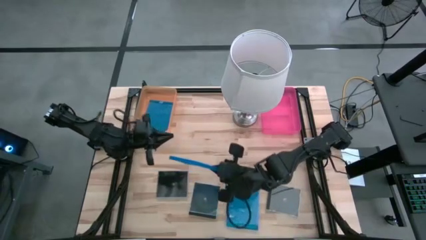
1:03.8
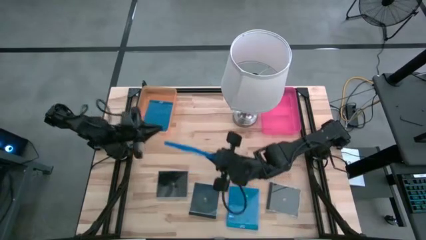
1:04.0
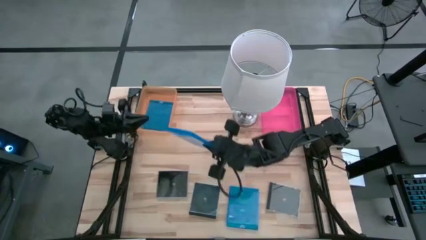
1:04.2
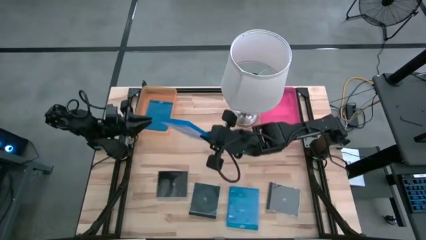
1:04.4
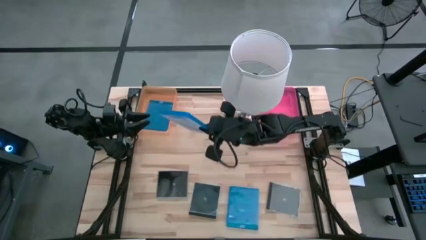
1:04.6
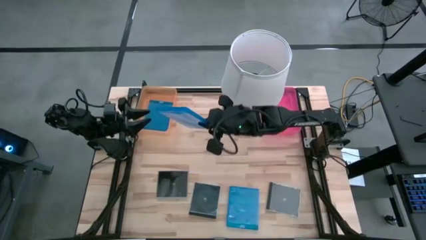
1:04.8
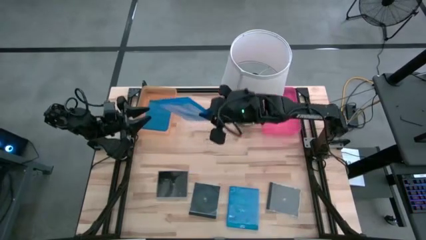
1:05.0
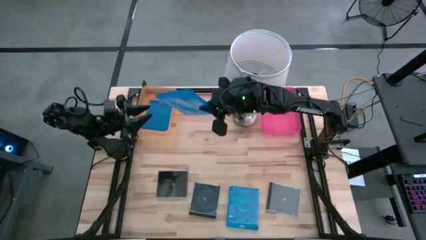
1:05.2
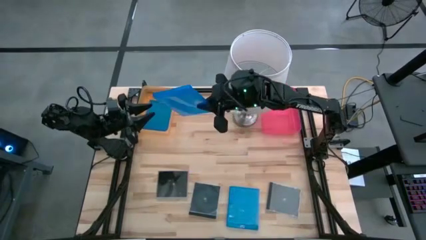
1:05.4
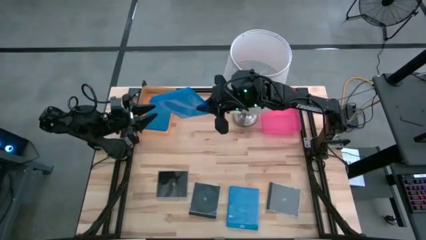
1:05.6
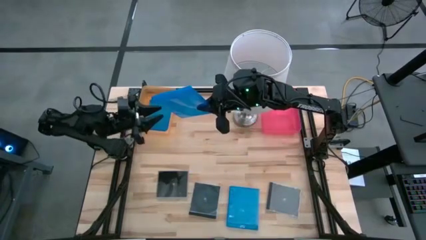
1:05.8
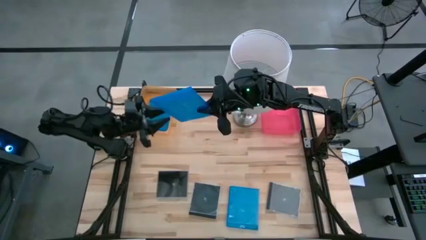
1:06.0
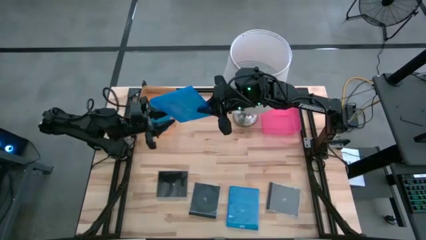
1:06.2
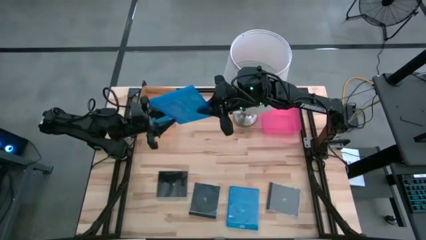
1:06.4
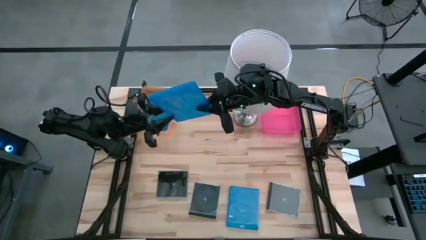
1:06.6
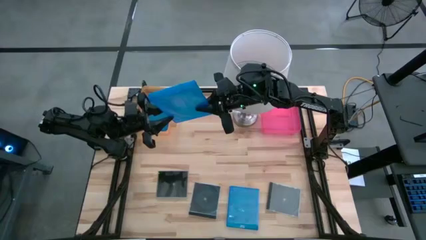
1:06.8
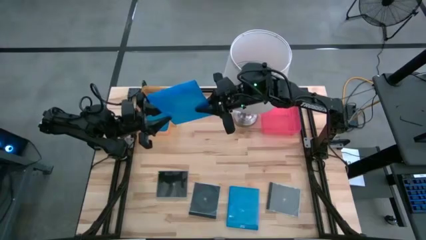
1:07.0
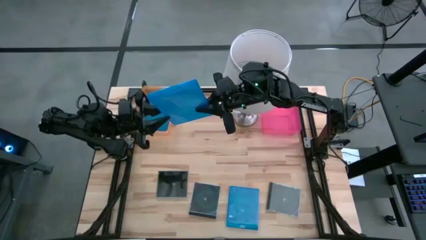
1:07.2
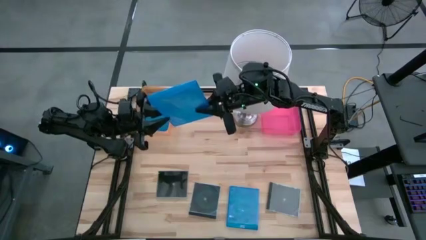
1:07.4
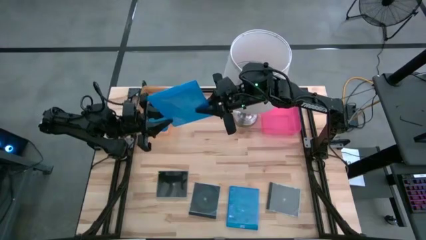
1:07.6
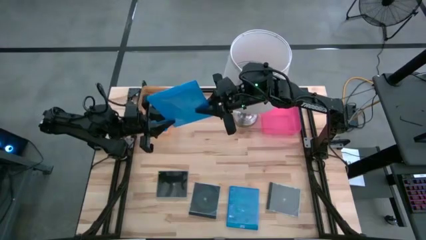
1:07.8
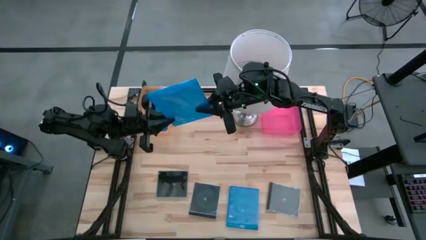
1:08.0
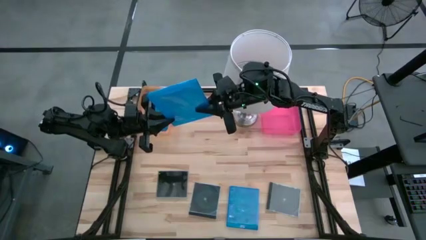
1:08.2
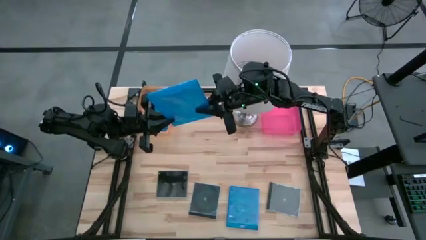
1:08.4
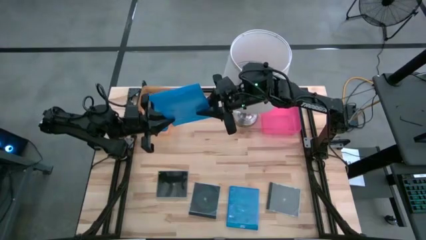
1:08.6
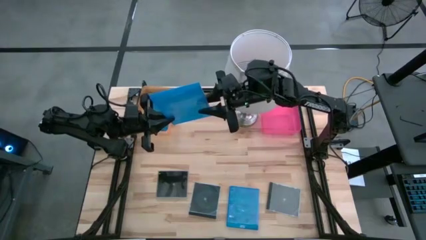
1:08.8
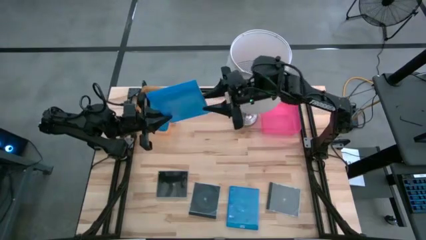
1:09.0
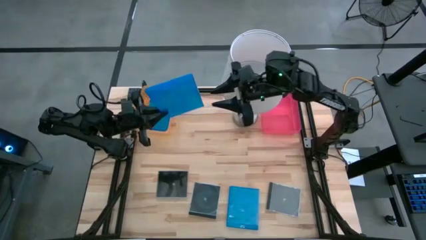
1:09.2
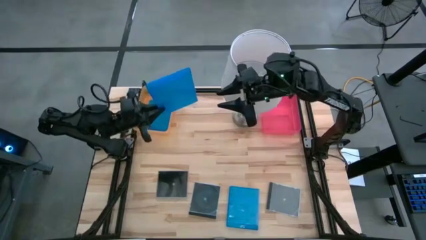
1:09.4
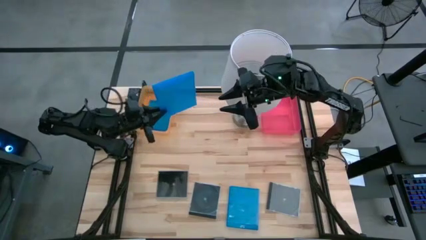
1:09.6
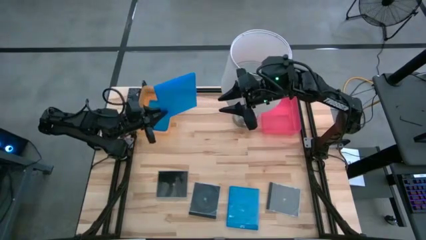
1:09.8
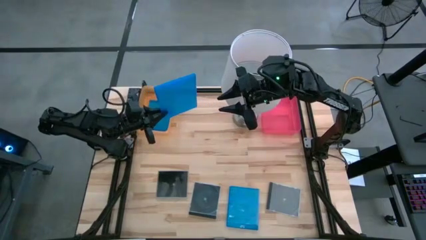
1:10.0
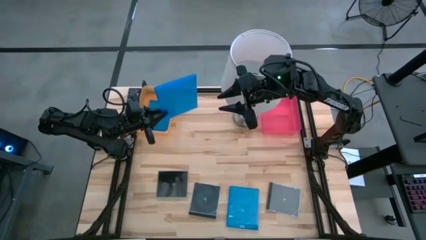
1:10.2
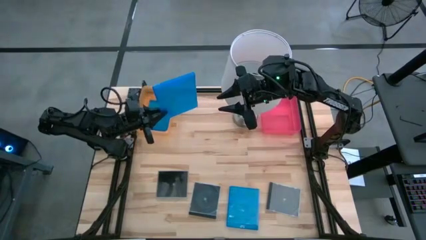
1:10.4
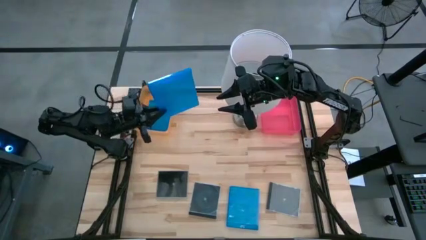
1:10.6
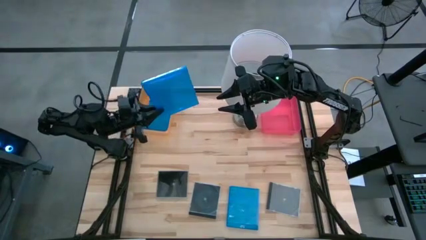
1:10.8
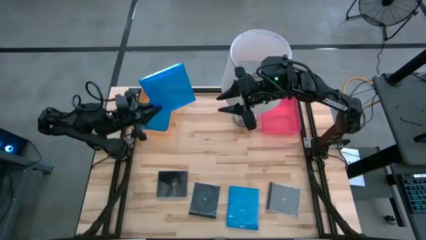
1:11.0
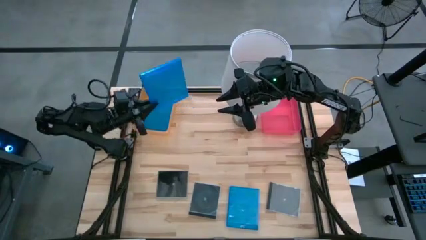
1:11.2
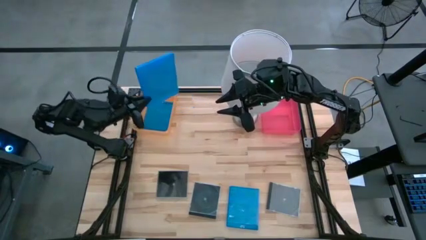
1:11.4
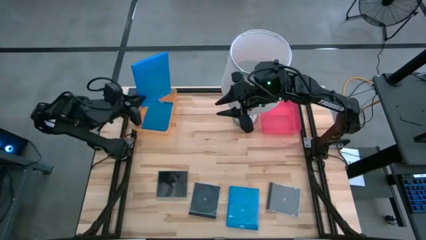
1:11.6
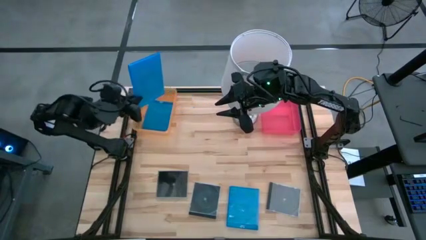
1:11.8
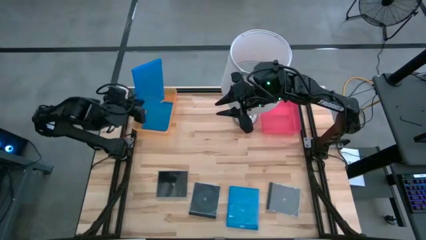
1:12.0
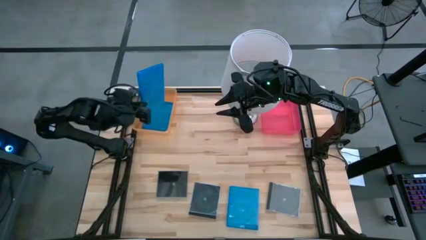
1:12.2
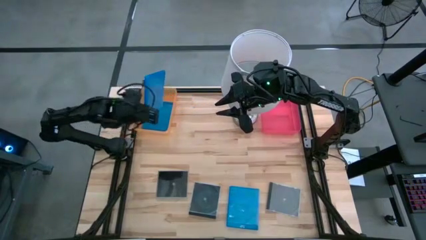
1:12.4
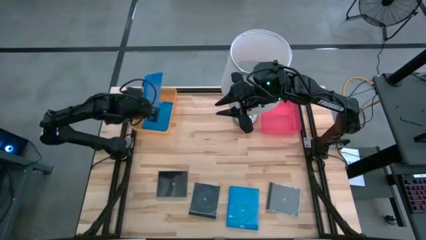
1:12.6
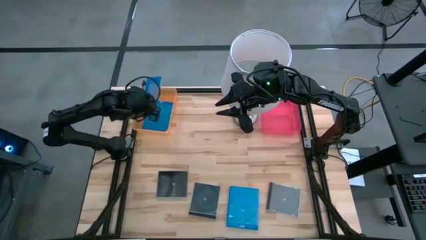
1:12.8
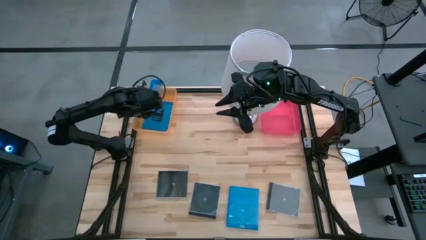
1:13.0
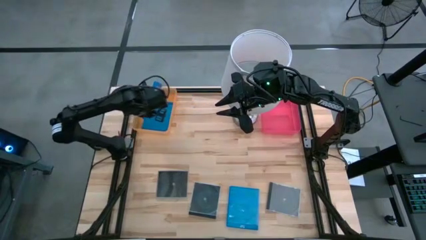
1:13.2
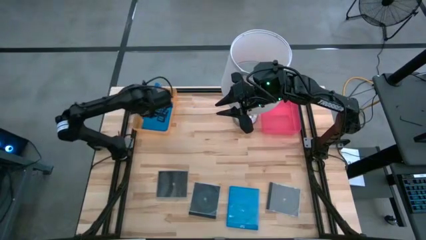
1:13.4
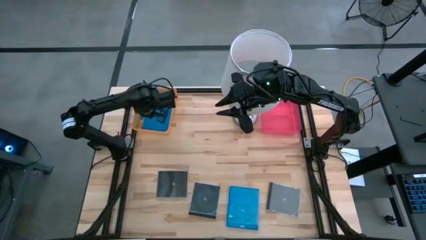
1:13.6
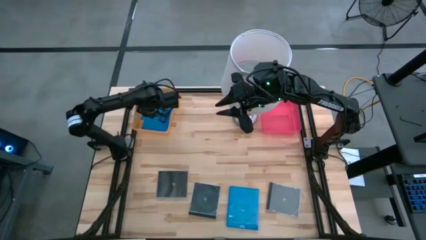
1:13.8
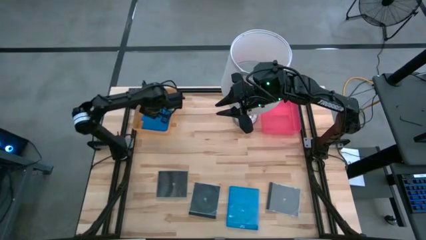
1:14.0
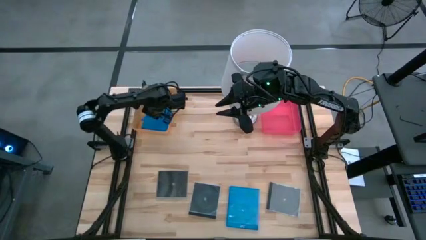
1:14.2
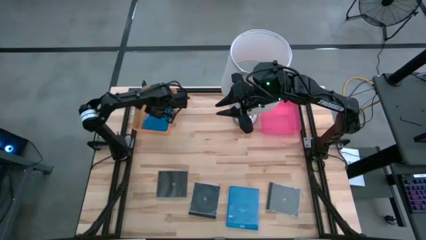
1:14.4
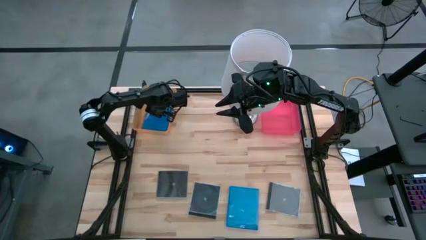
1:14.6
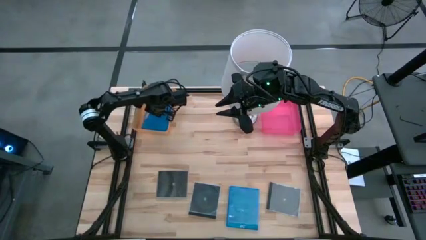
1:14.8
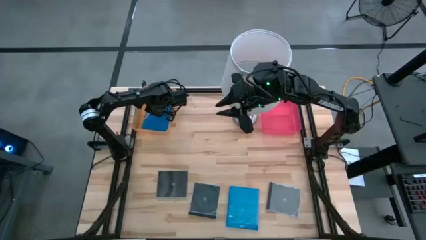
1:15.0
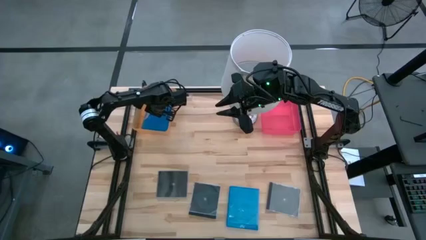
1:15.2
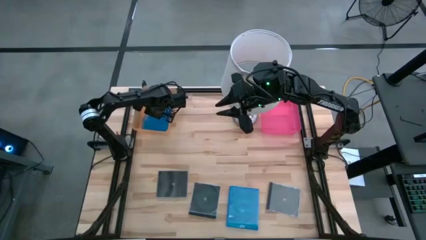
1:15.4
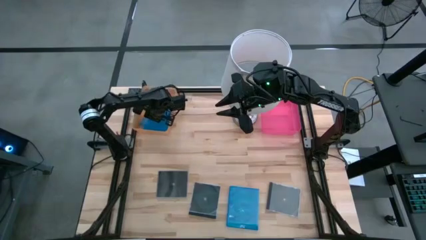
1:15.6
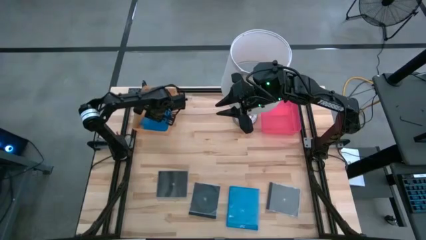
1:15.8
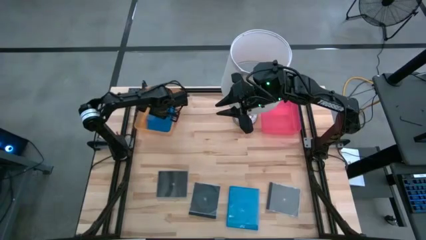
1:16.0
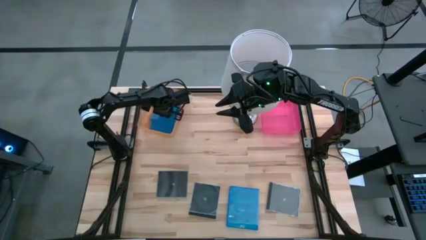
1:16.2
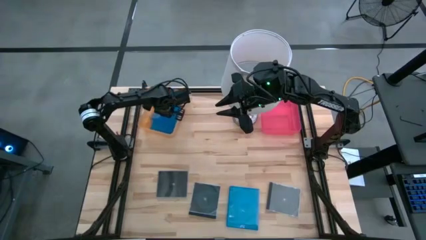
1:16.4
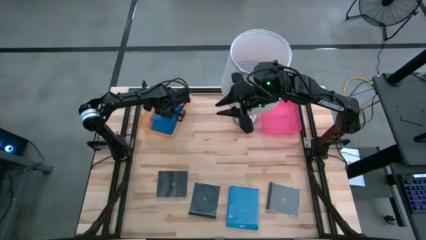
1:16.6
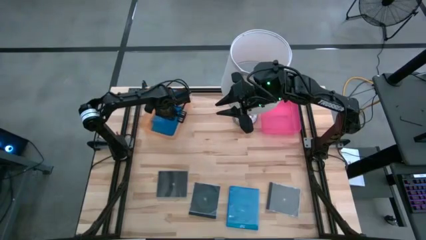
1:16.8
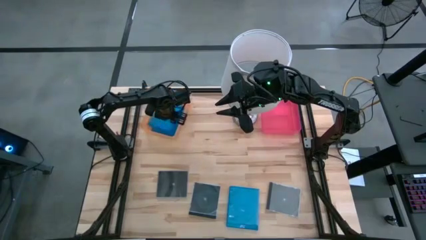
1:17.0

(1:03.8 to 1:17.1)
Task: Pick & place jewel cases by type
Put the blue cd case into the orange bin
